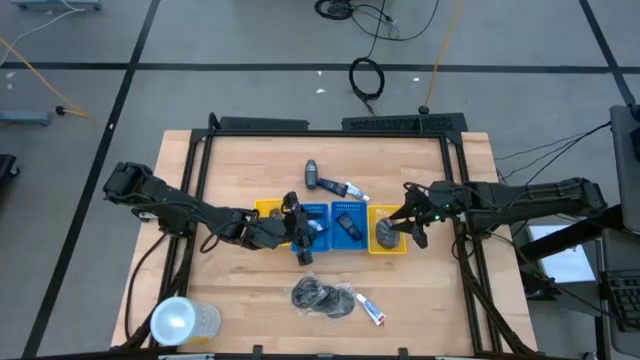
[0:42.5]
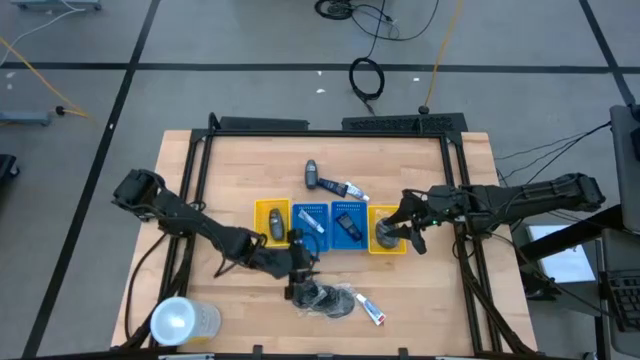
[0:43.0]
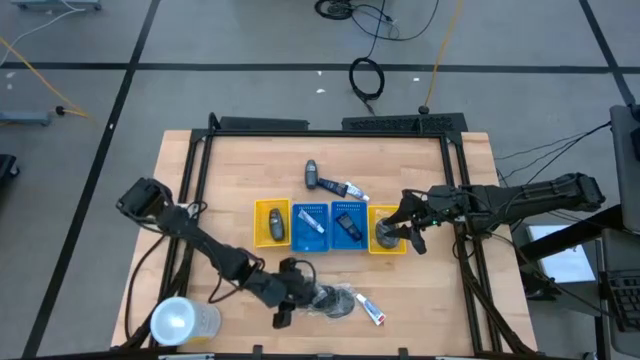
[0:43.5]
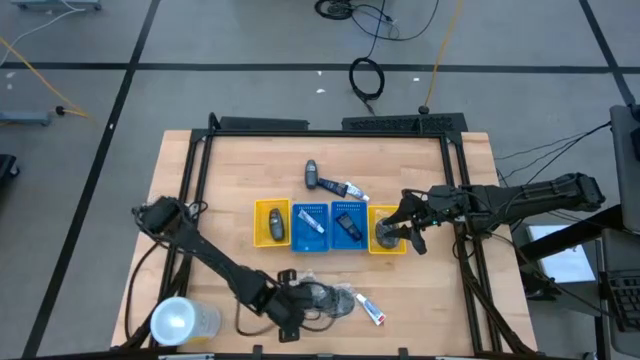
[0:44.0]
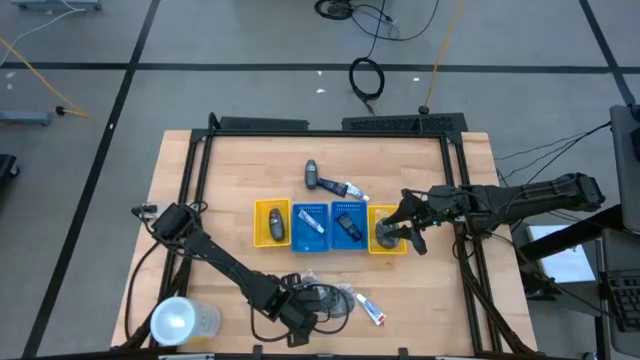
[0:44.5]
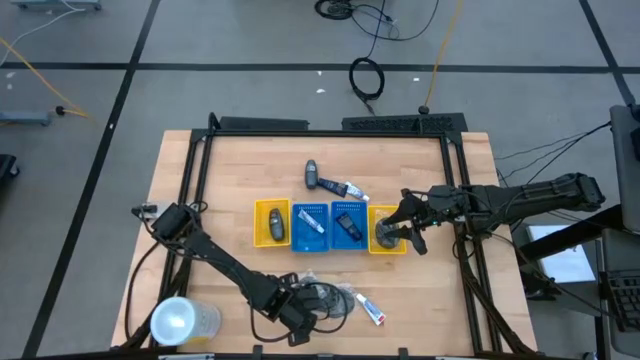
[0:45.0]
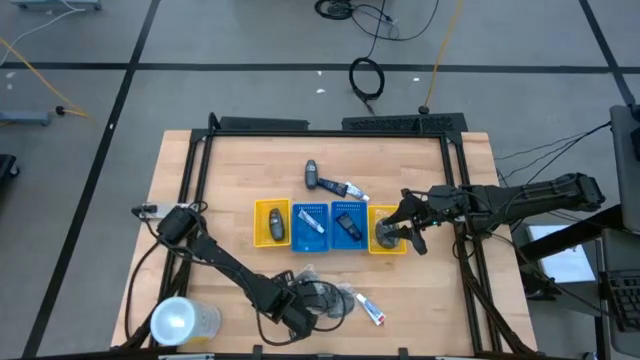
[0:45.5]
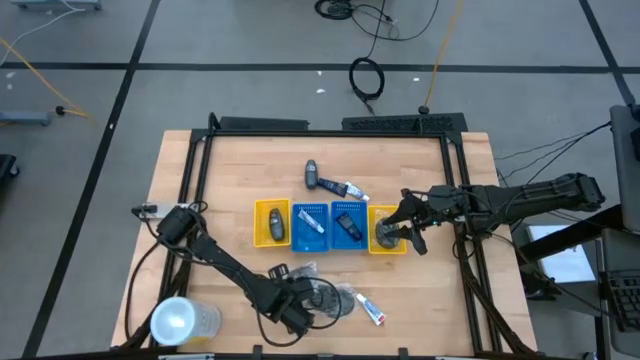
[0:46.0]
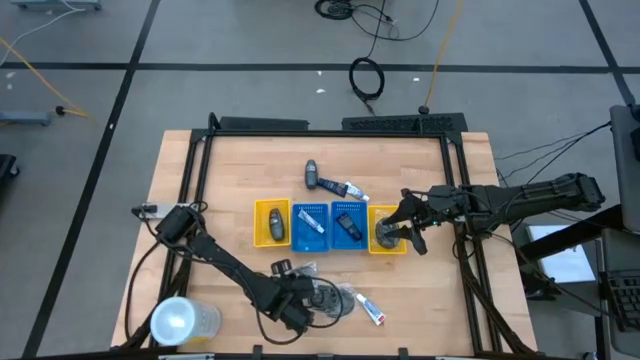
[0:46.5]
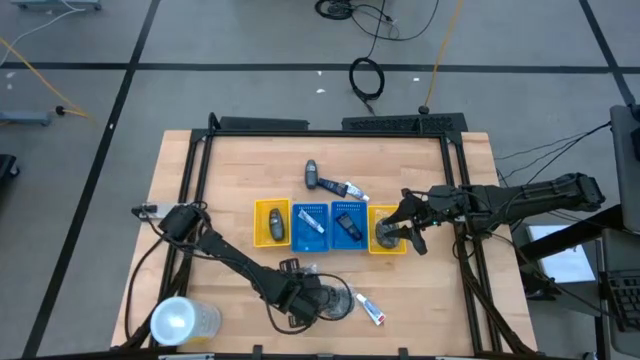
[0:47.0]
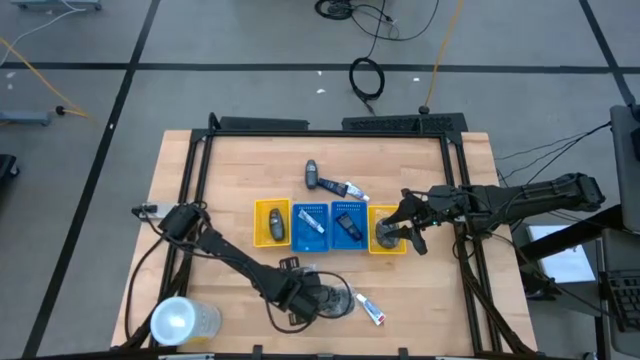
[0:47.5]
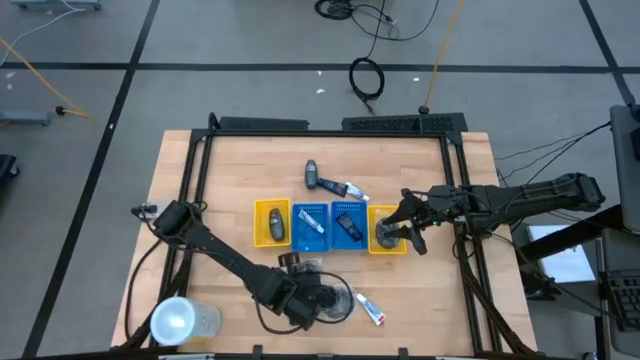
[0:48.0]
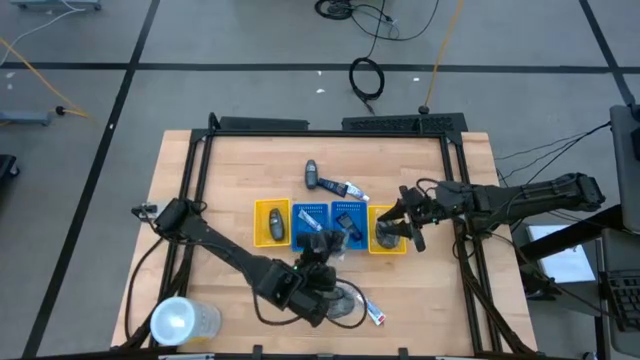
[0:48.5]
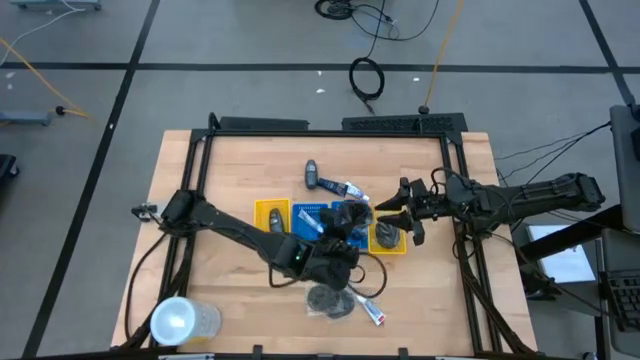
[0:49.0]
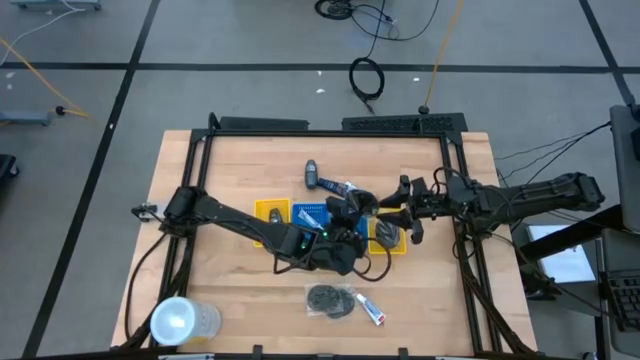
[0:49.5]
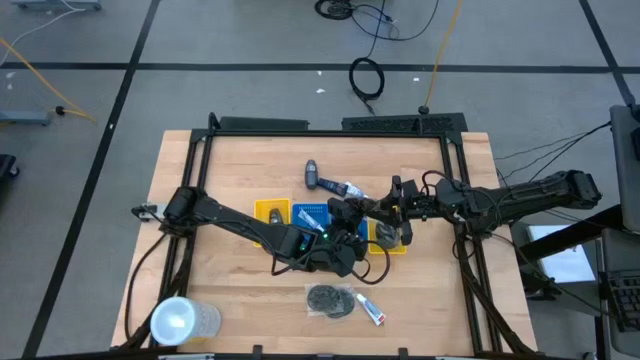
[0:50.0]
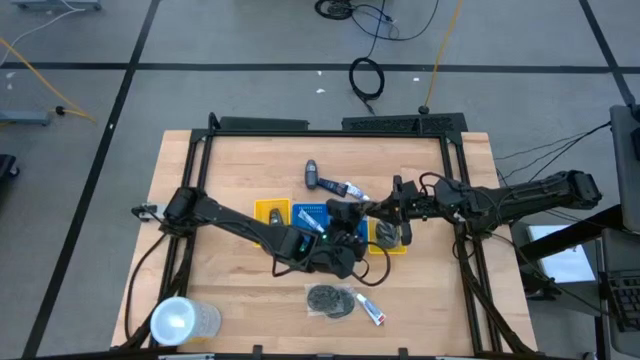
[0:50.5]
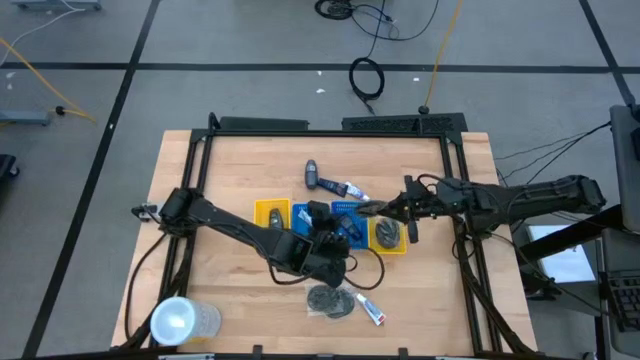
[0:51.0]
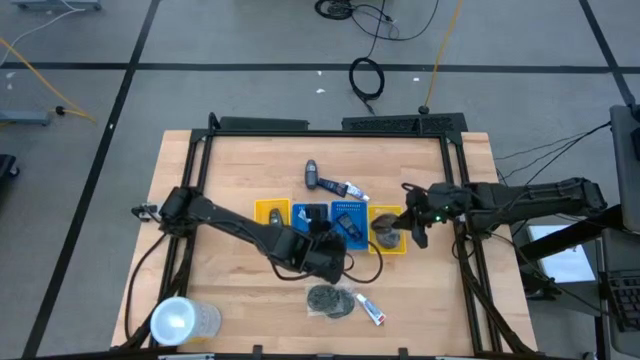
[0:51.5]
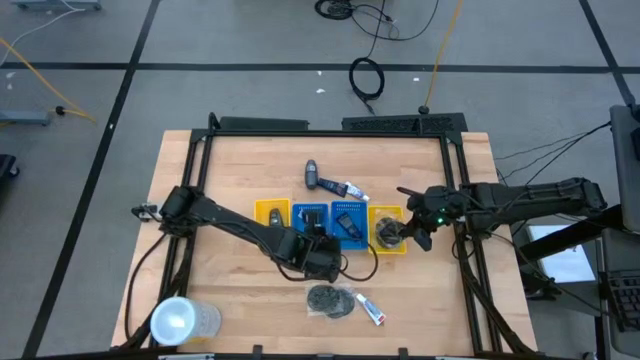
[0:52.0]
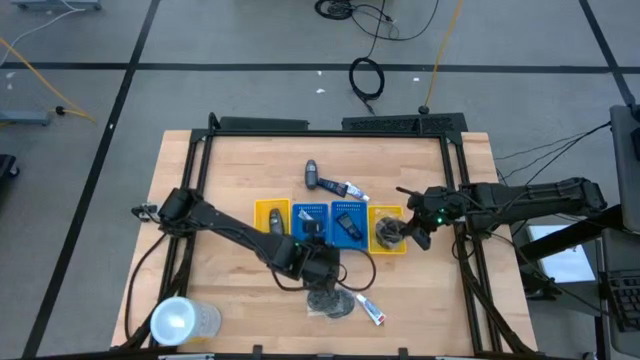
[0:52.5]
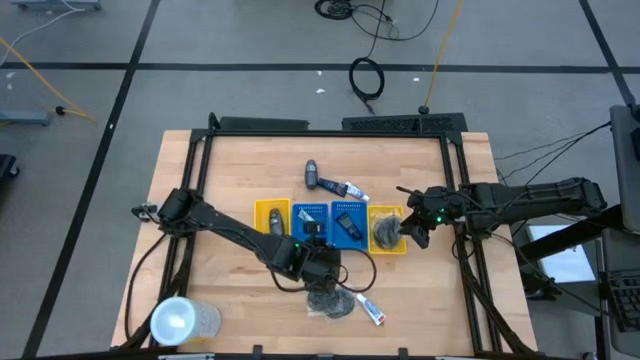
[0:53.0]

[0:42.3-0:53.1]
Task: Pick & Place Travel size toiletries
Put the black hairbrush into the right yellow basket

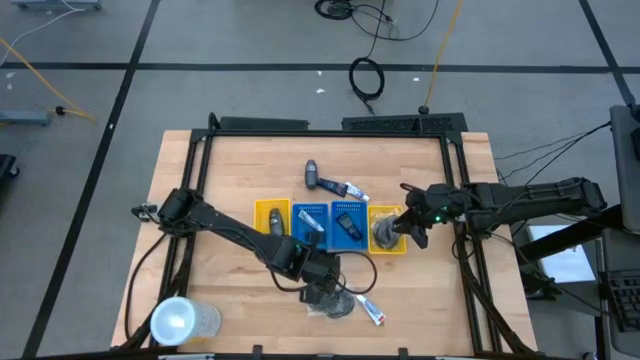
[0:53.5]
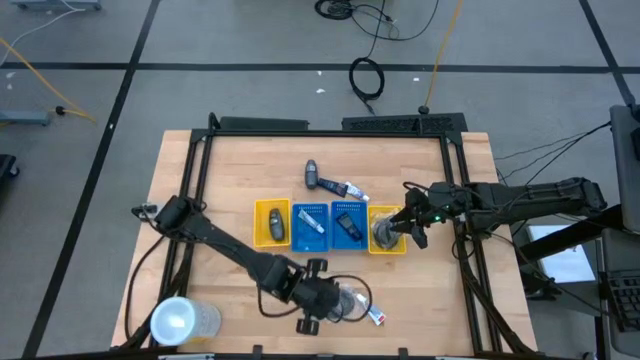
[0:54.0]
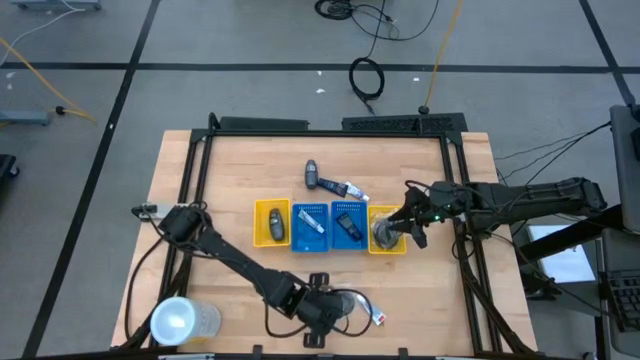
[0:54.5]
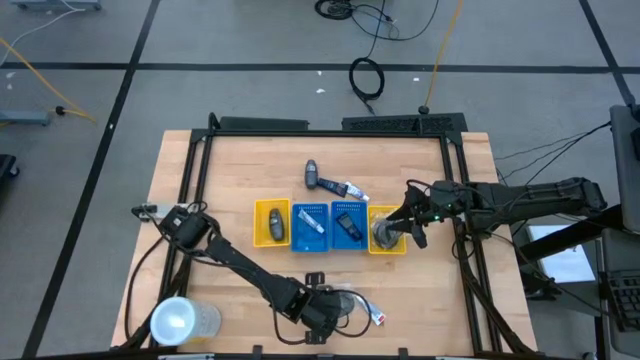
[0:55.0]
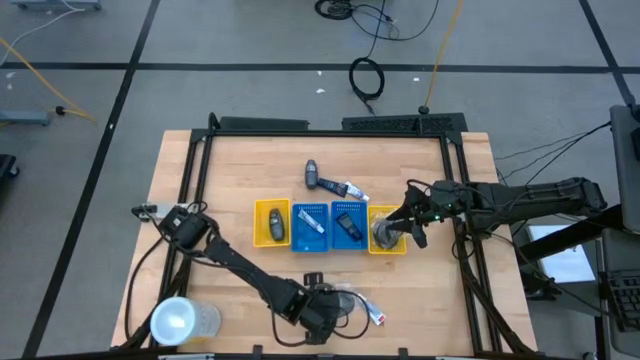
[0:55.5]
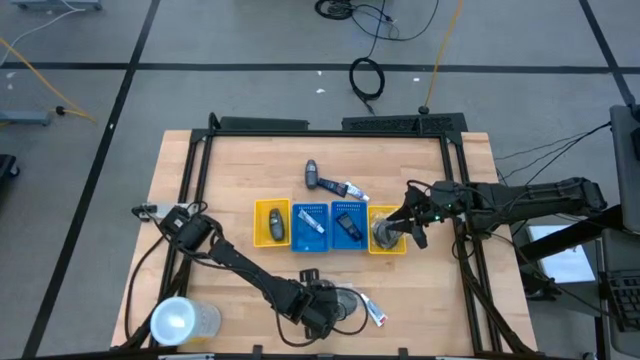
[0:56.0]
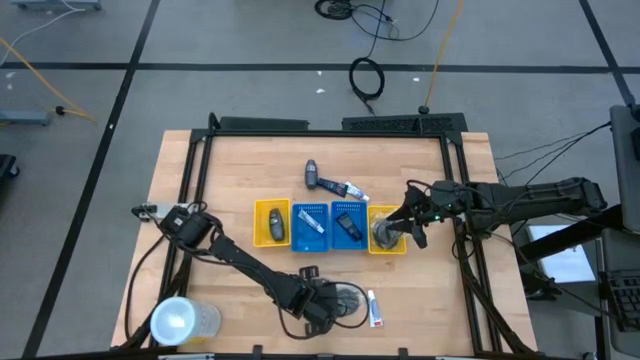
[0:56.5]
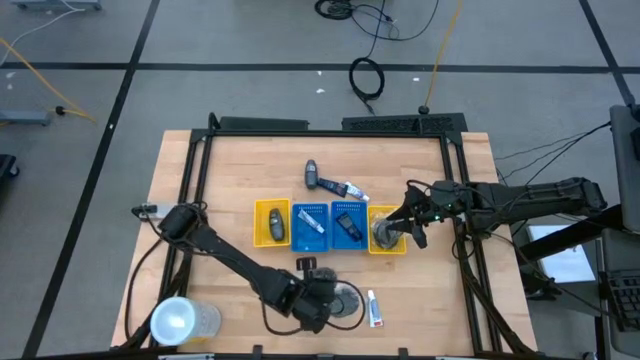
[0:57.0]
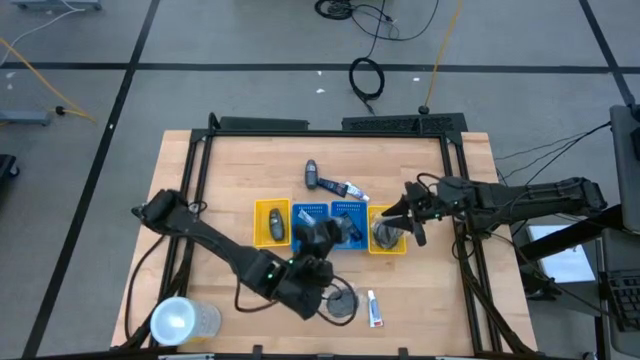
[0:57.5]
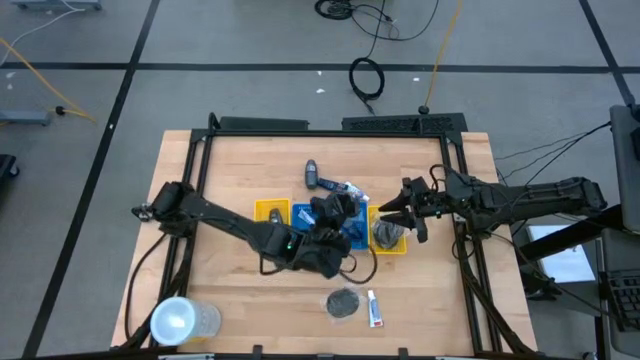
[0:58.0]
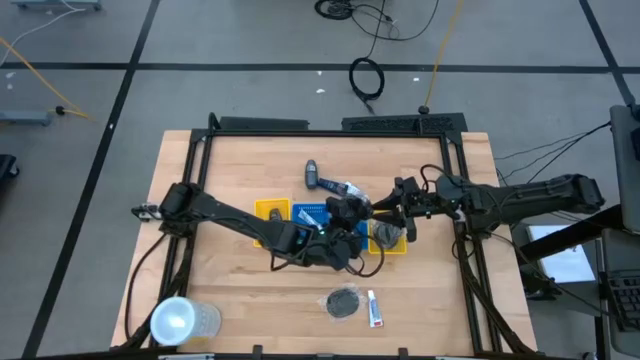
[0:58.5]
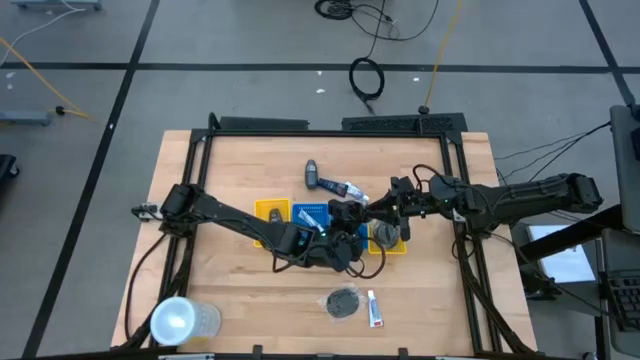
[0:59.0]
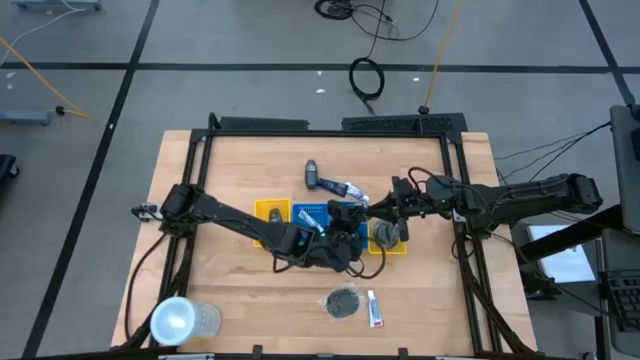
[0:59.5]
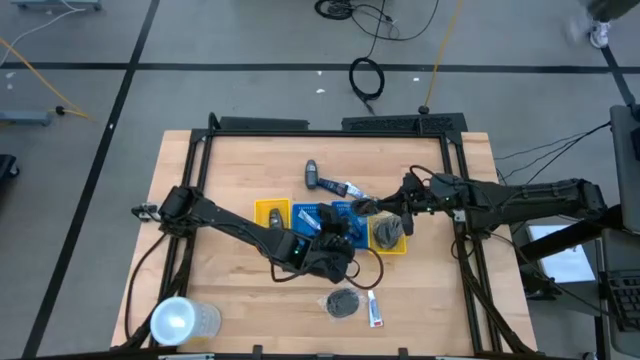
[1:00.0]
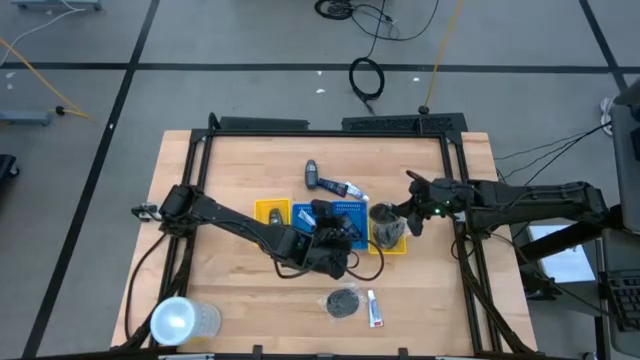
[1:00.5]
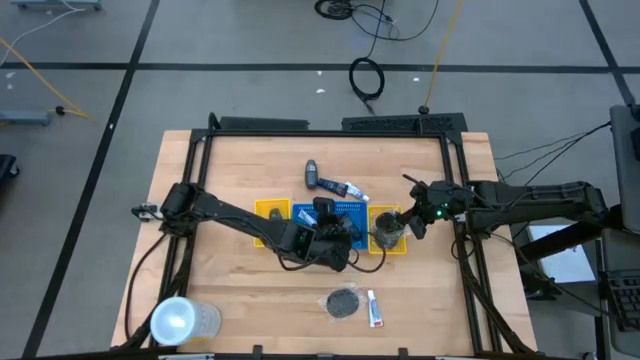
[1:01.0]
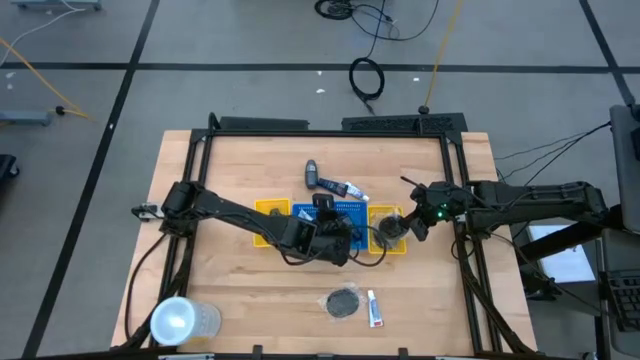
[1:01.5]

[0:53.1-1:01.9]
Put the black hairbrush into the right yellow basket

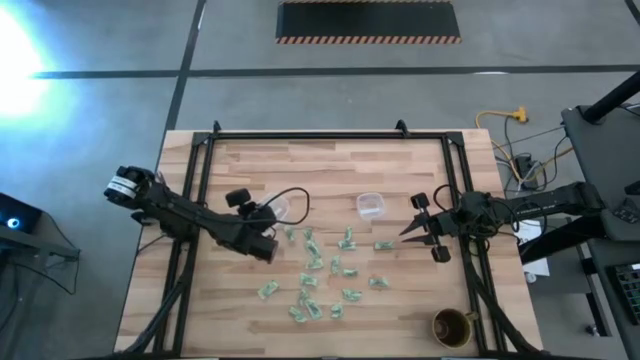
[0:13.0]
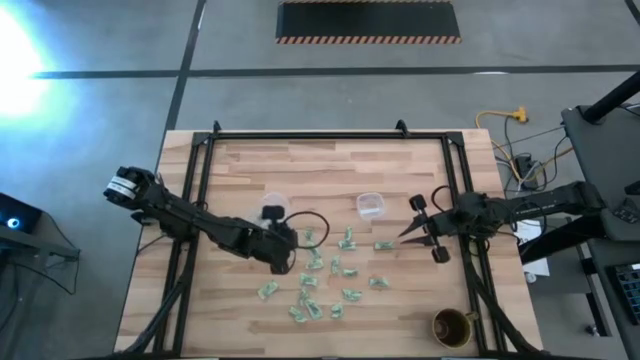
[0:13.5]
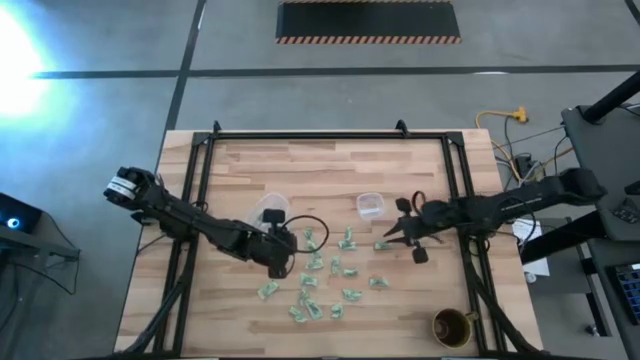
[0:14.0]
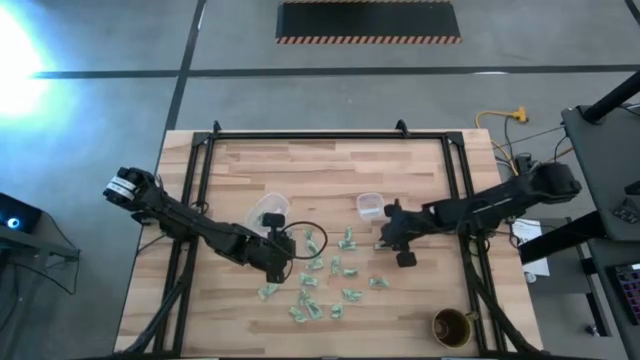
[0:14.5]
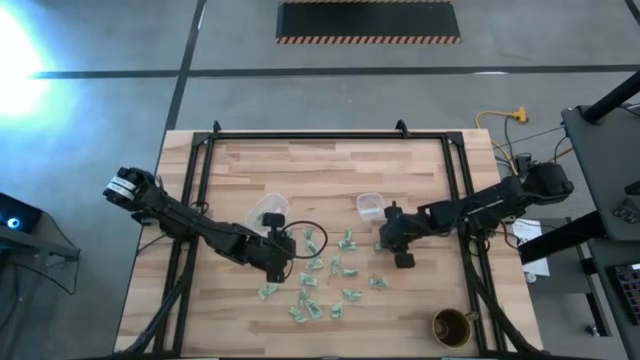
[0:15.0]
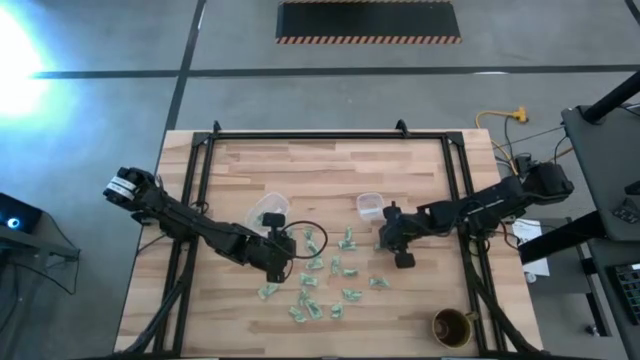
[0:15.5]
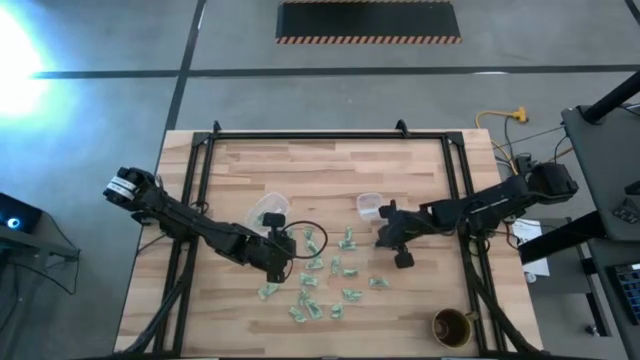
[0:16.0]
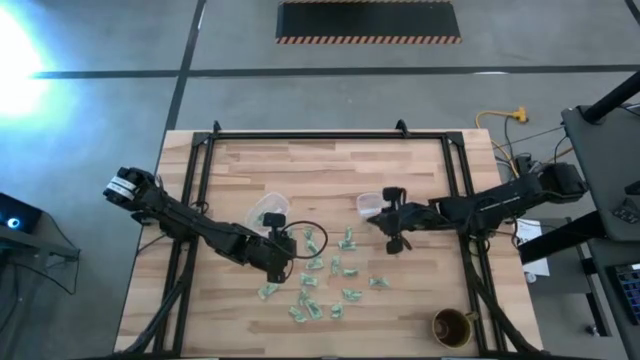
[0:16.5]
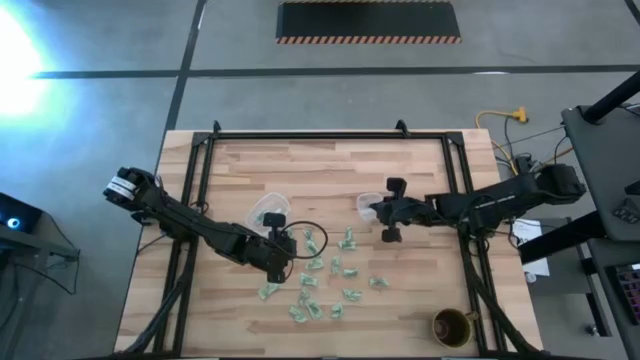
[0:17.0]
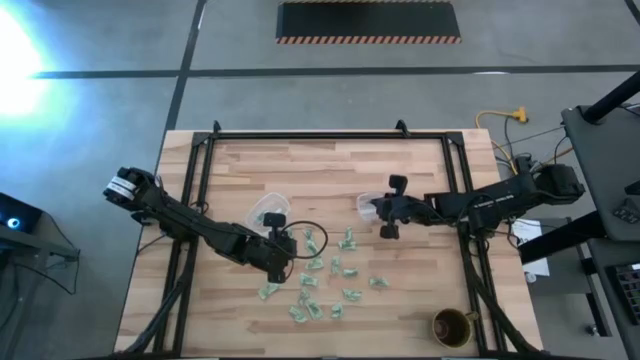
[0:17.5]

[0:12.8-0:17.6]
Task: Pick and place Stevia / Truvia into bins
Put the light green stevia packet into the right transparent container
